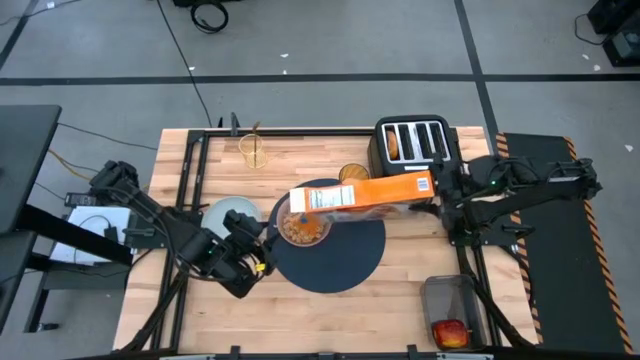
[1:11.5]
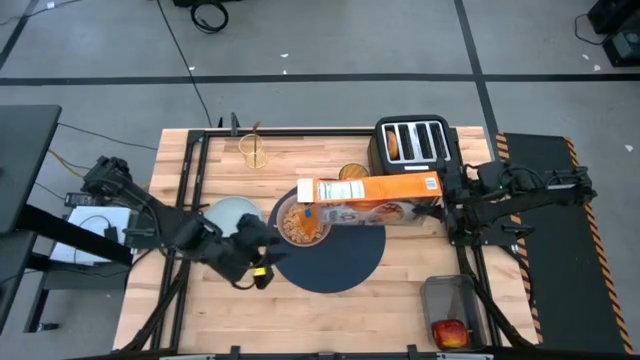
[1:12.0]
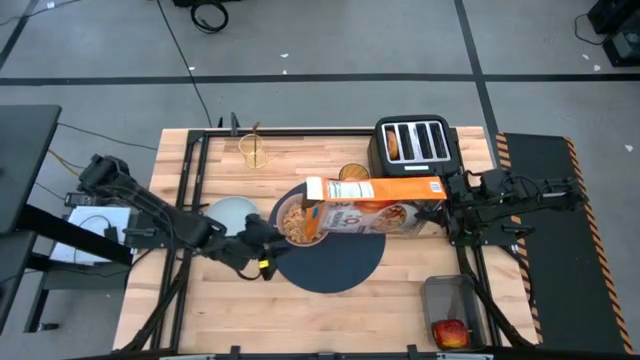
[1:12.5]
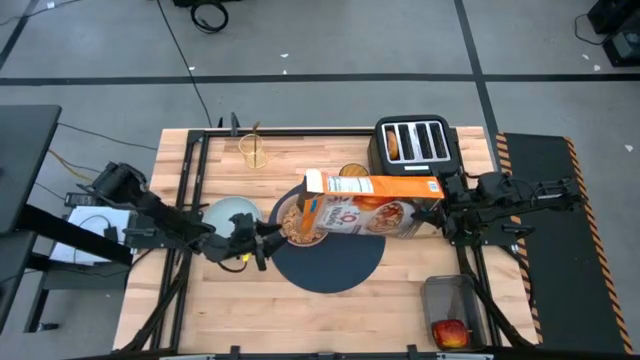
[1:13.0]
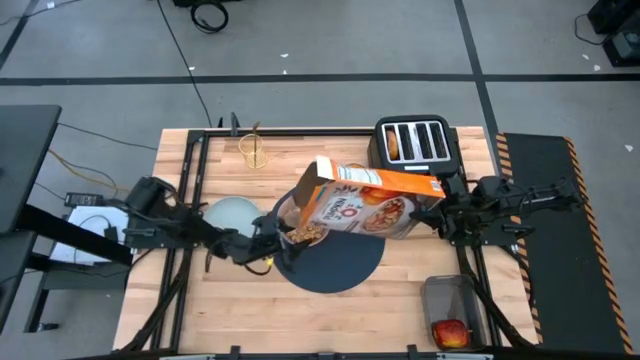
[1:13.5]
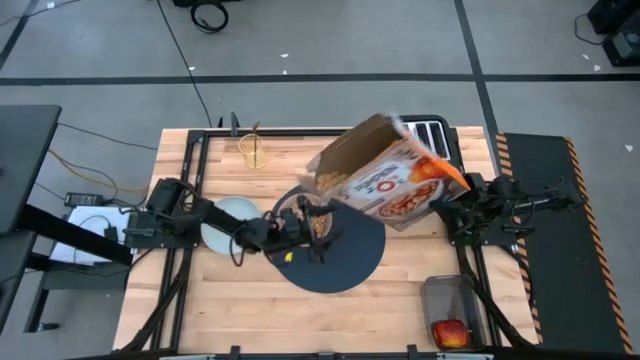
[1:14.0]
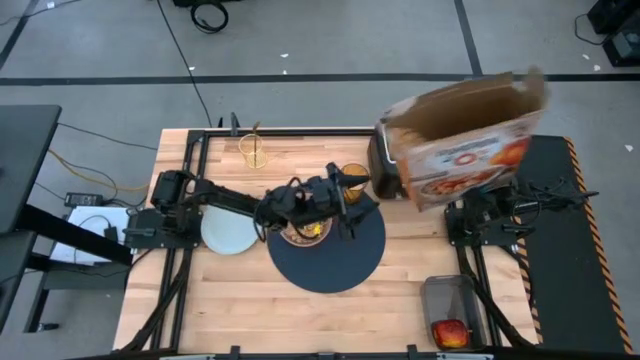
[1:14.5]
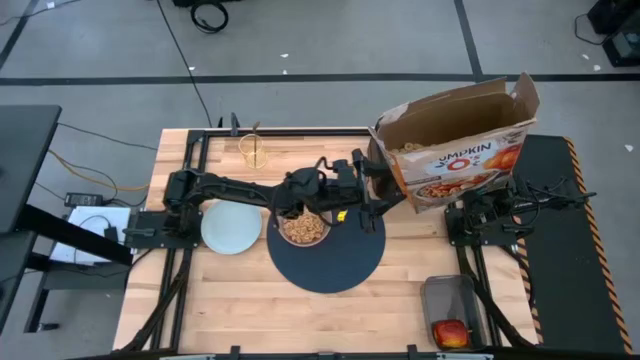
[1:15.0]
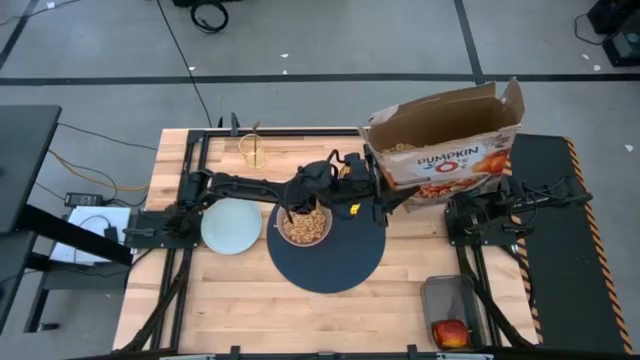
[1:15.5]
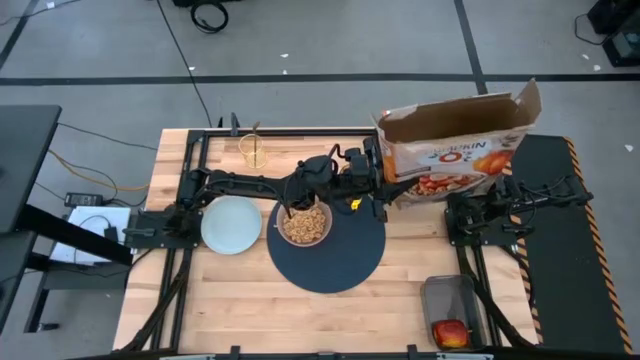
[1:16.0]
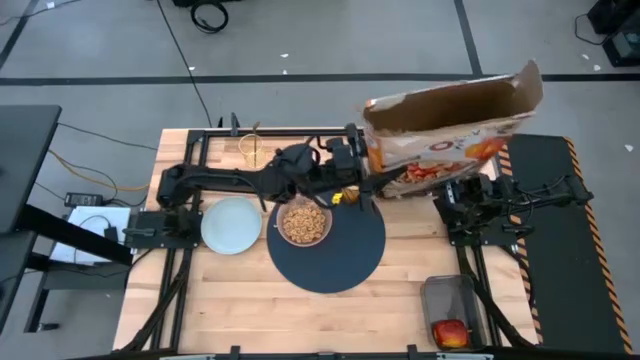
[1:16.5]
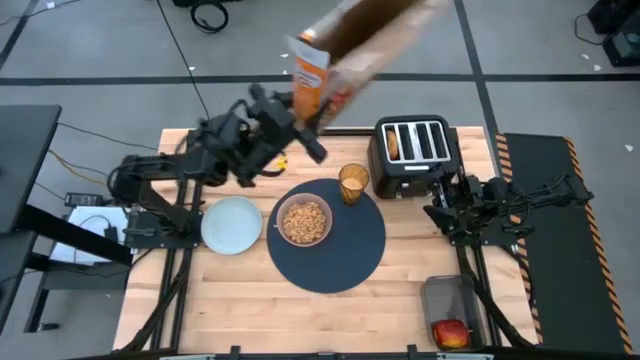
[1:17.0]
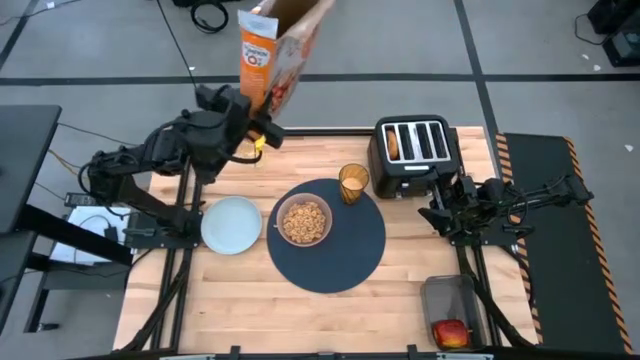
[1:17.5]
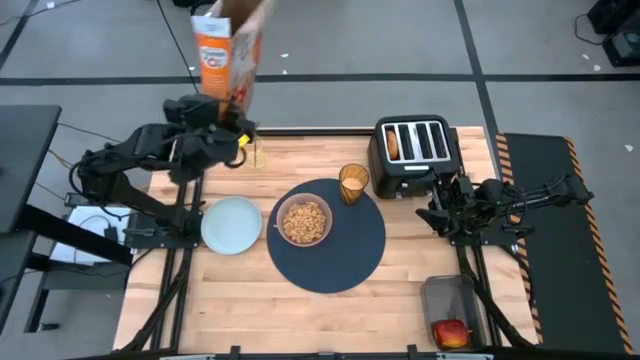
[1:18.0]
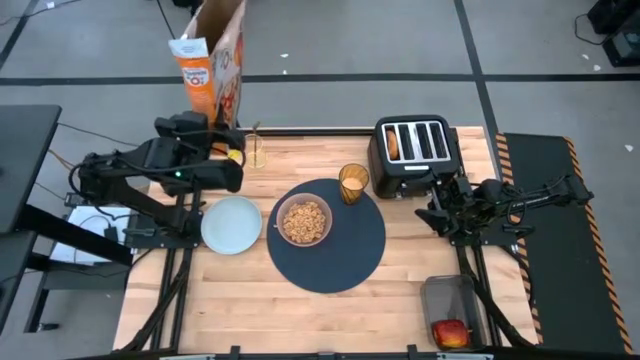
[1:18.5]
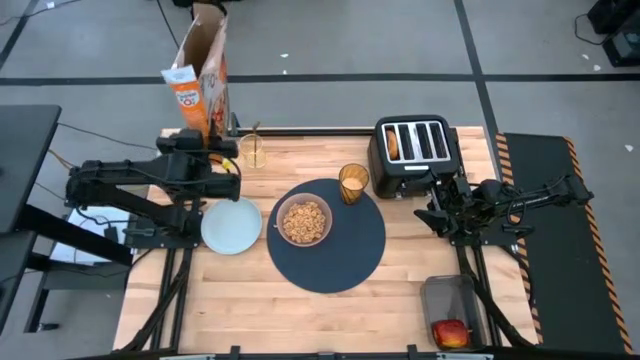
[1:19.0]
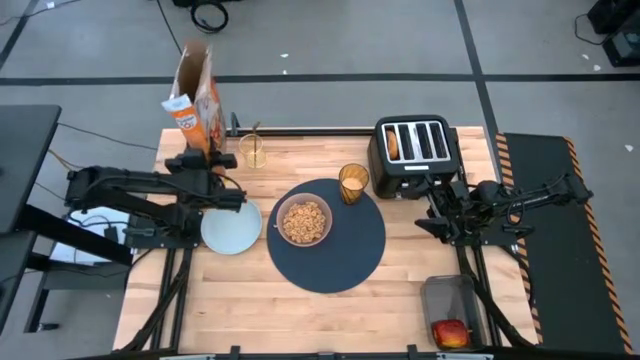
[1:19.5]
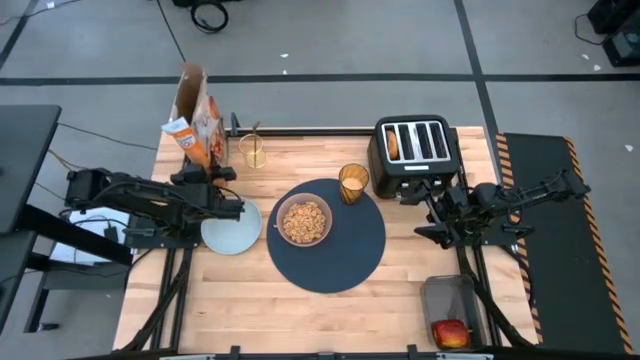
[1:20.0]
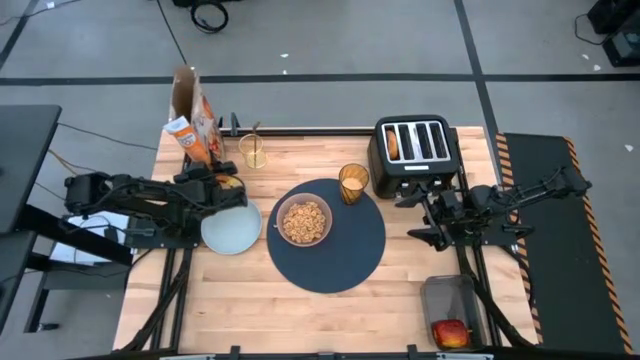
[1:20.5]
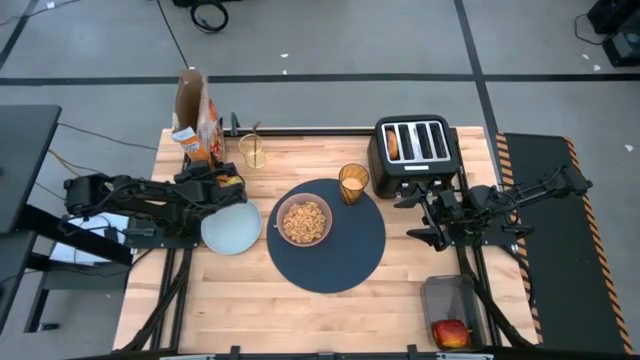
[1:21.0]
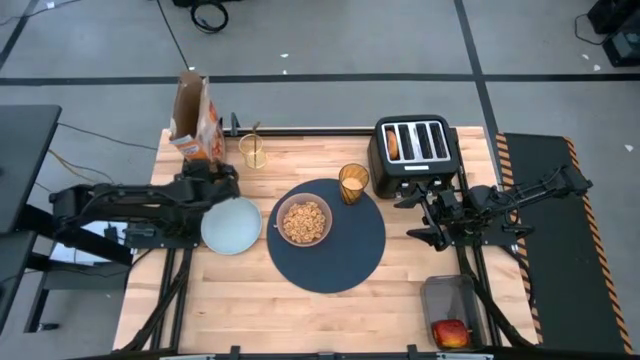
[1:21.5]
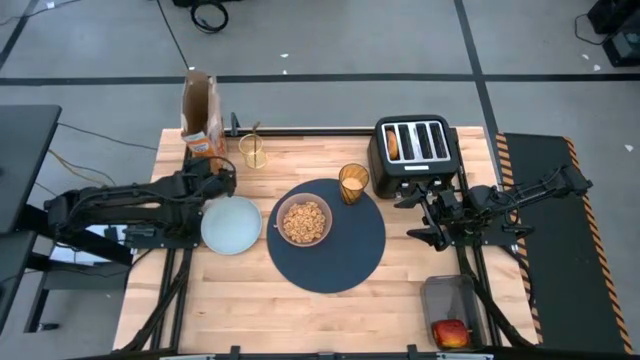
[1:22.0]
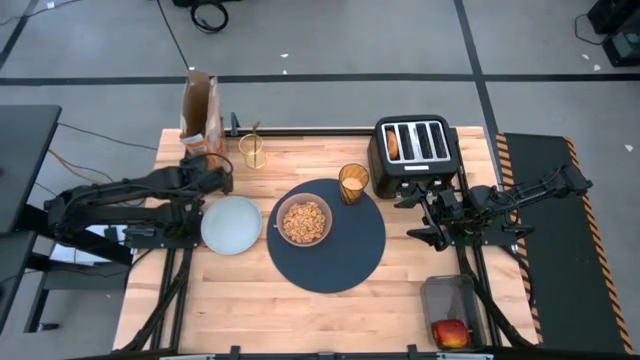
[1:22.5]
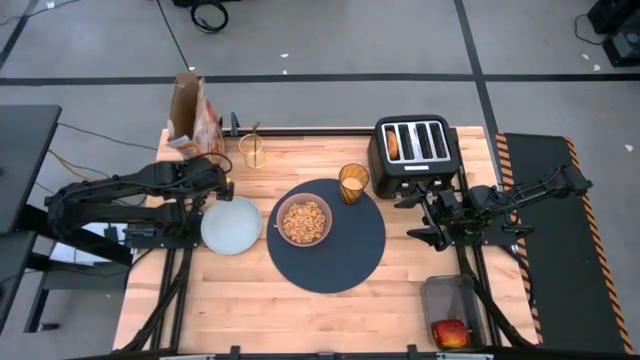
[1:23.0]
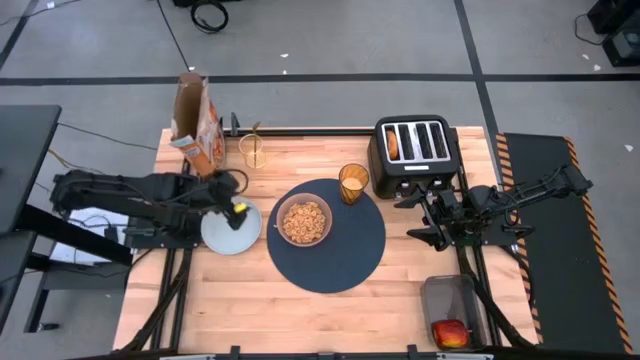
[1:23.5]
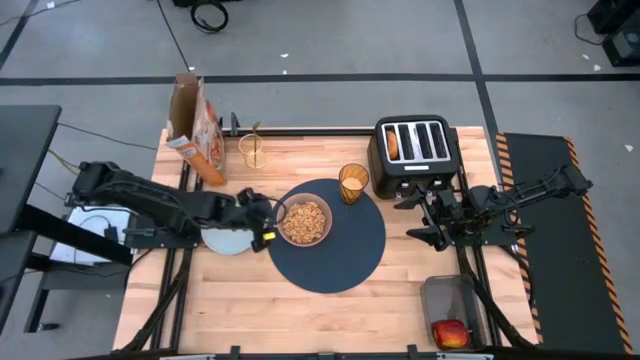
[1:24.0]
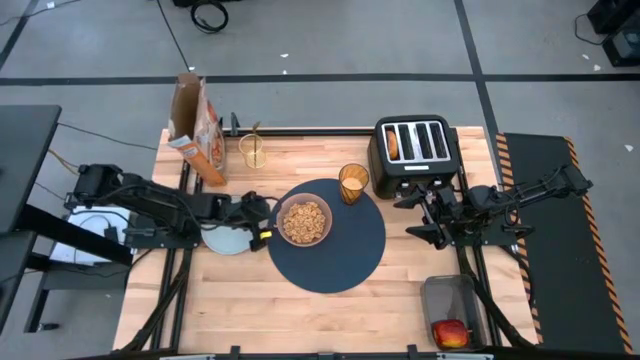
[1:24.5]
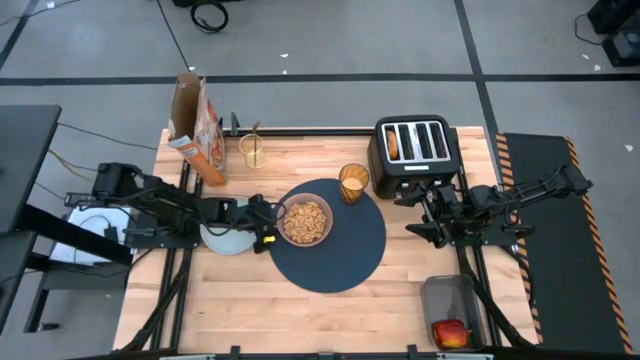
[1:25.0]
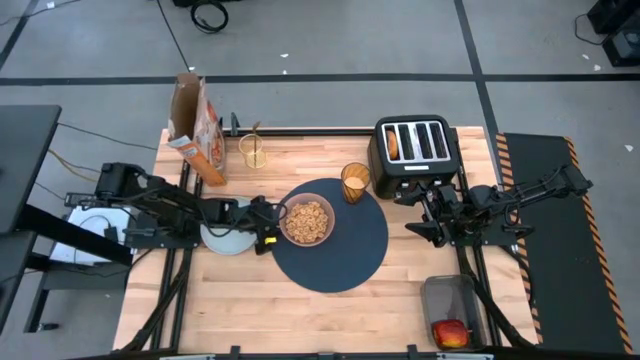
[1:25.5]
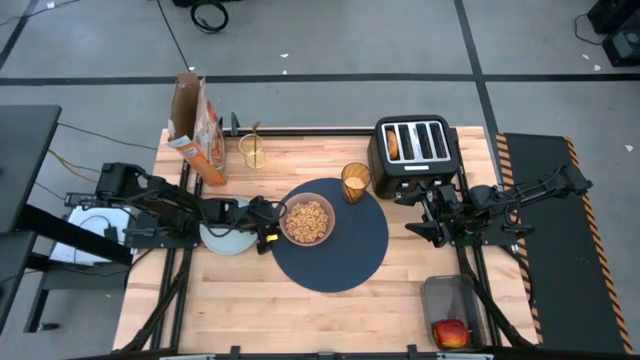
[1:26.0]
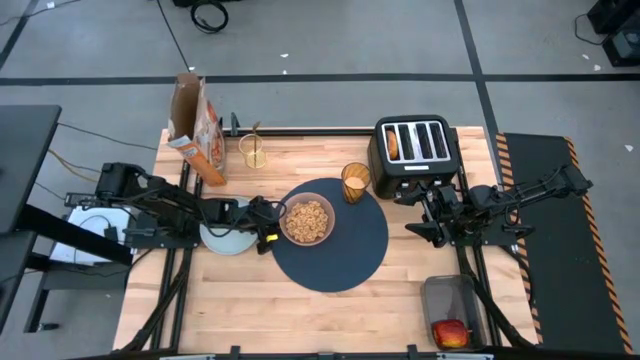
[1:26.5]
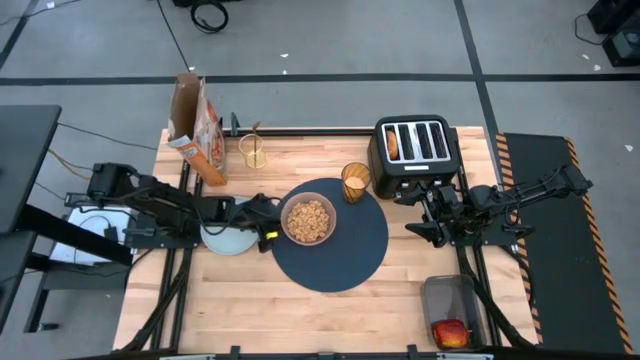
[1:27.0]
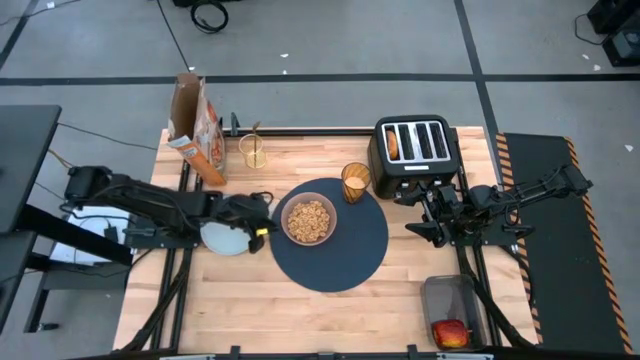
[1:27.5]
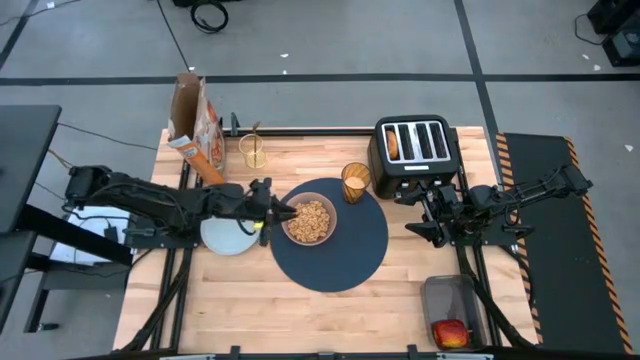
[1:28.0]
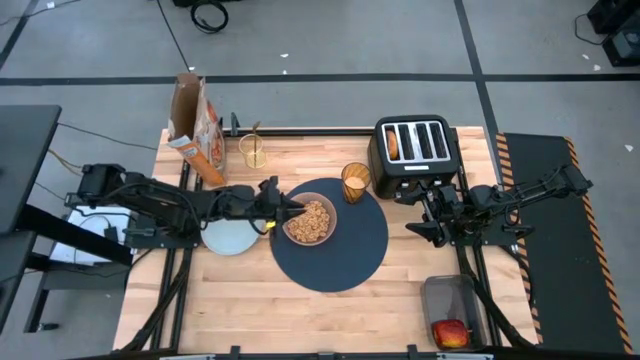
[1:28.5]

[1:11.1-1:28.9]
Task: Arrange a breakfast setting
Pour the cereal from the orange cereal box into the light orange bowl

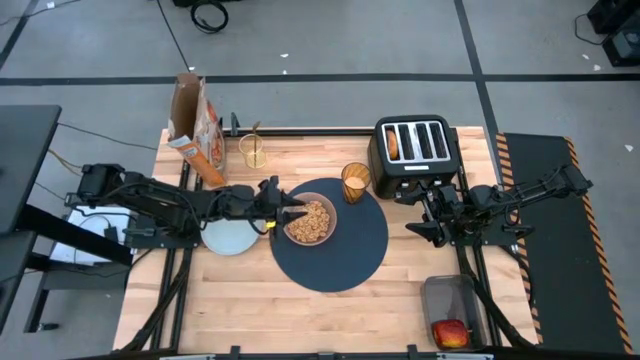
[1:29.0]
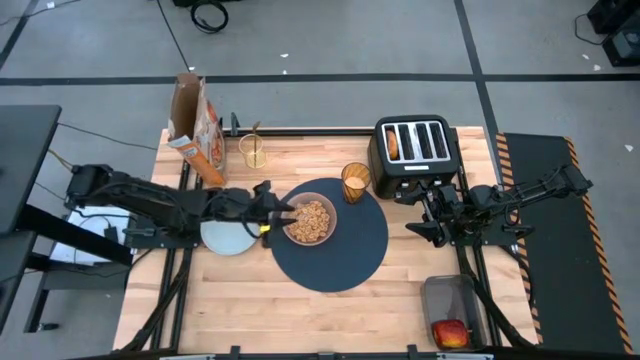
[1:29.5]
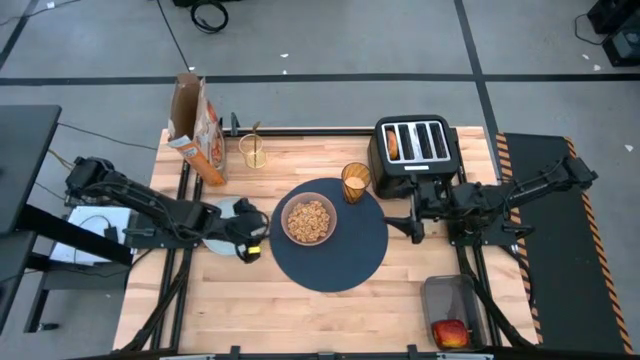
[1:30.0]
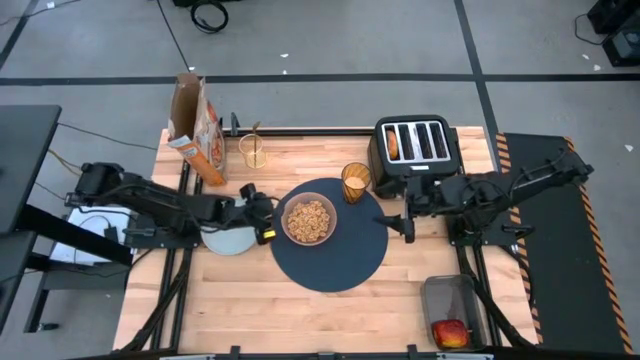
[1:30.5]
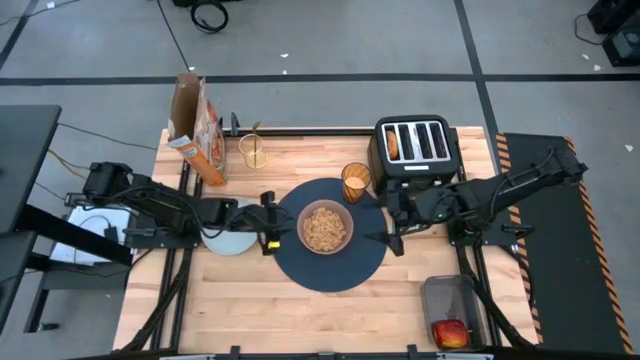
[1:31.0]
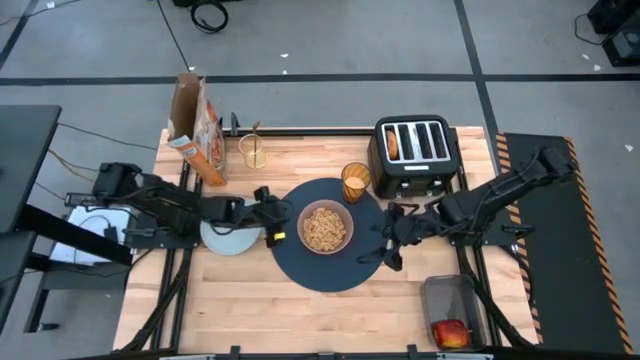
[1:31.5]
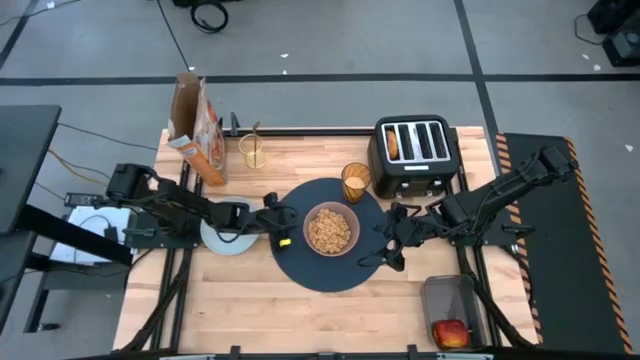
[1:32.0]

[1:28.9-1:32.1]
Adjust the light orange bowl

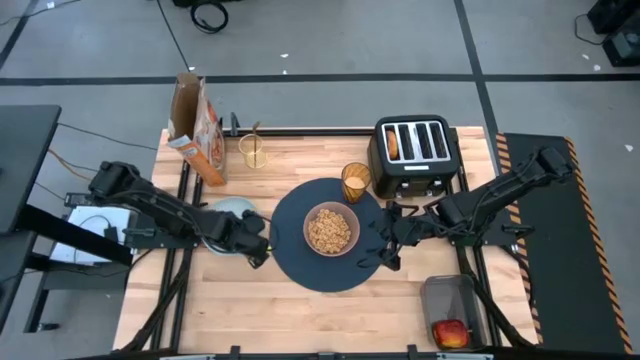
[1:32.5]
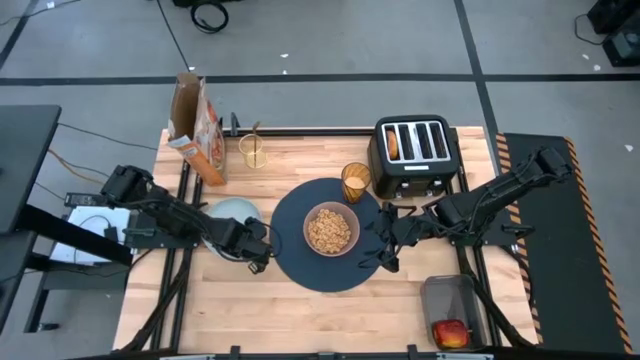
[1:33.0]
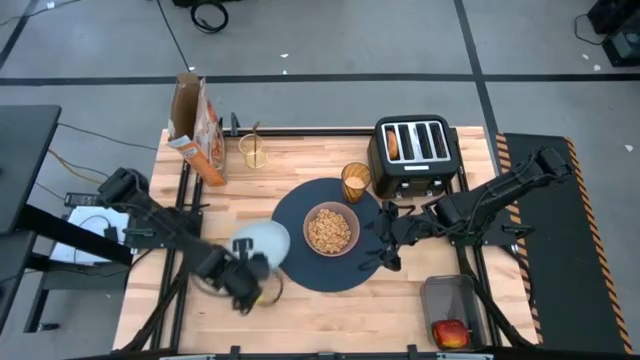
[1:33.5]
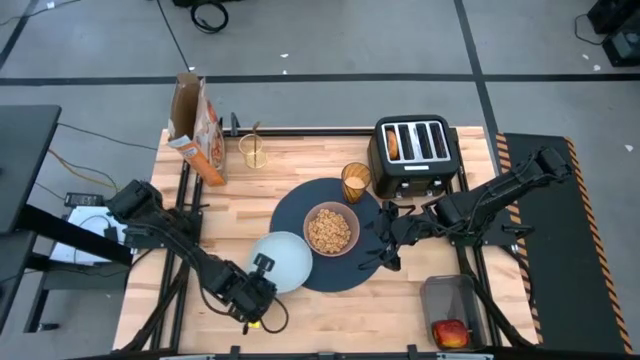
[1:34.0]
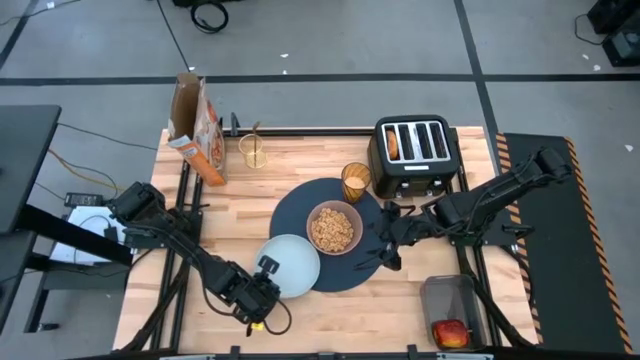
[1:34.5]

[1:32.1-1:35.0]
Put the blue plate on the bottom left of the blue table placemat
